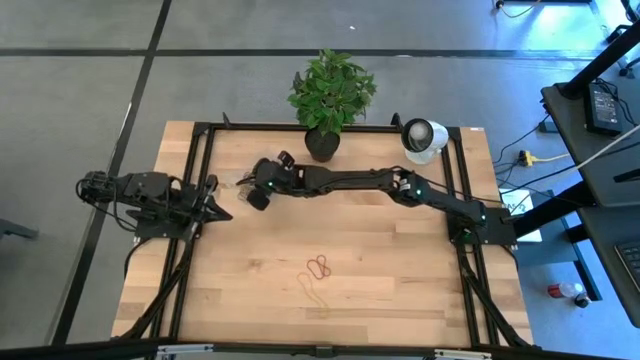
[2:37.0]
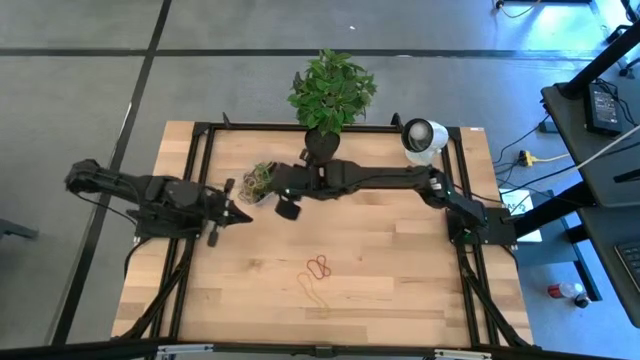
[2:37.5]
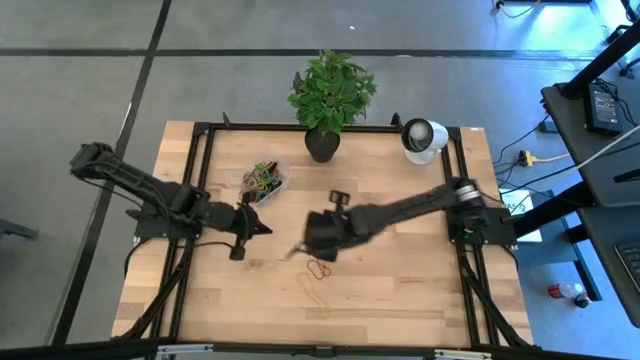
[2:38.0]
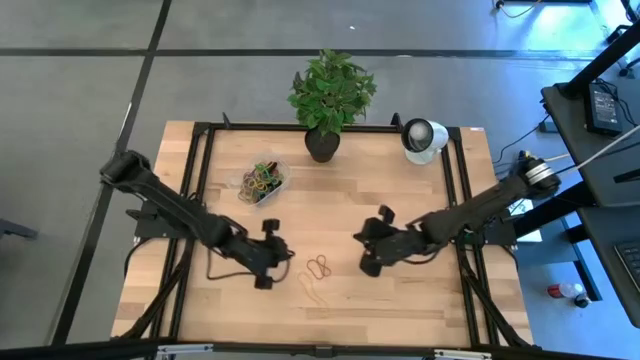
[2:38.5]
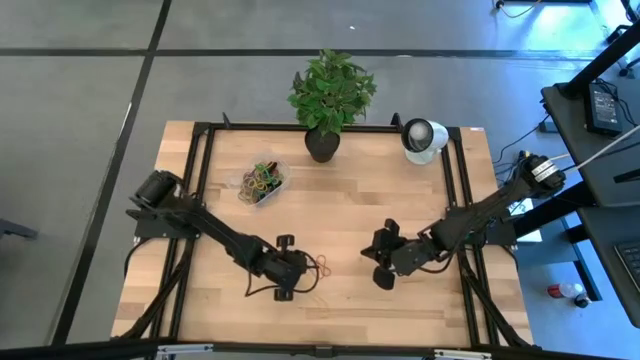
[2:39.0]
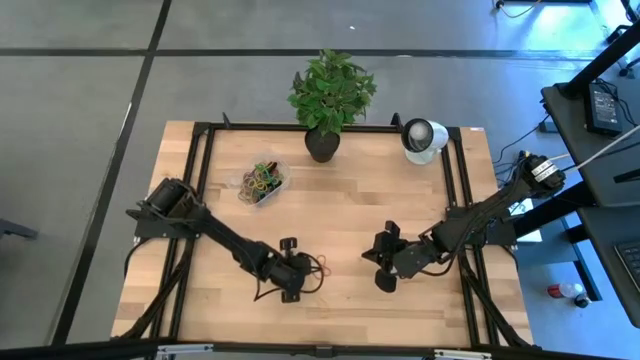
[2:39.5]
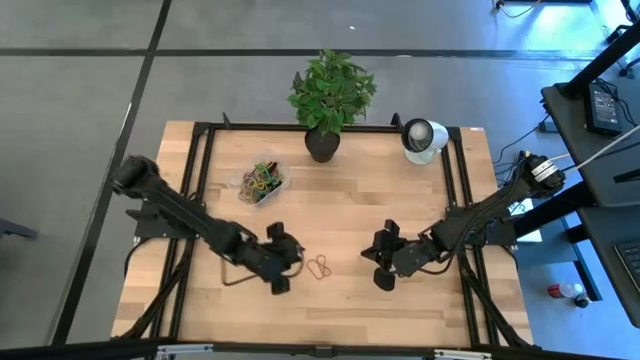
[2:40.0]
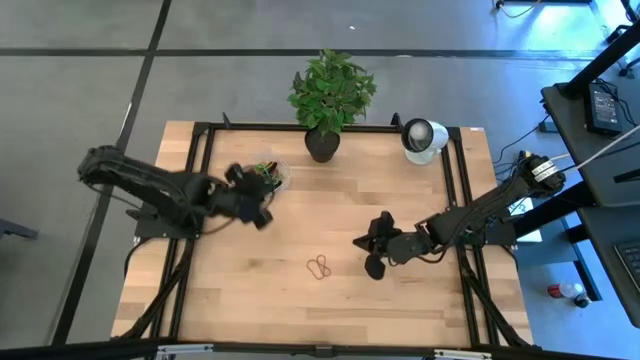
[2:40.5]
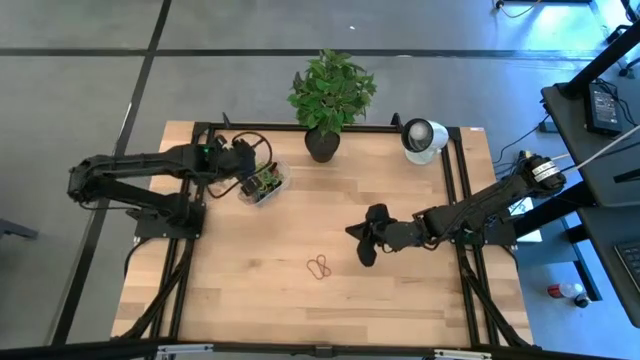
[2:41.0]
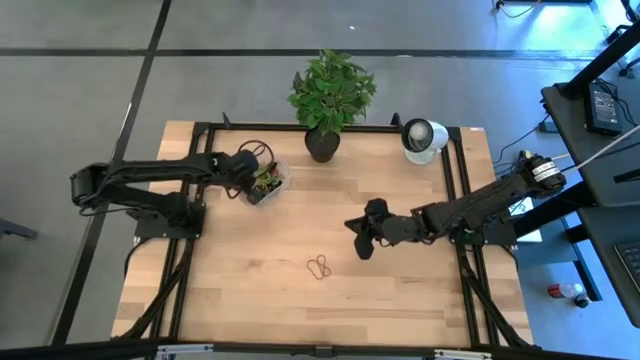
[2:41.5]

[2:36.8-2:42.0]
Task: Pick and place rubber bands into bin
Put the yellow rubber band into the transparent bin

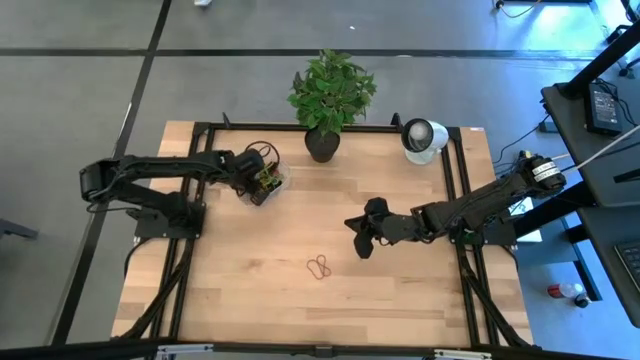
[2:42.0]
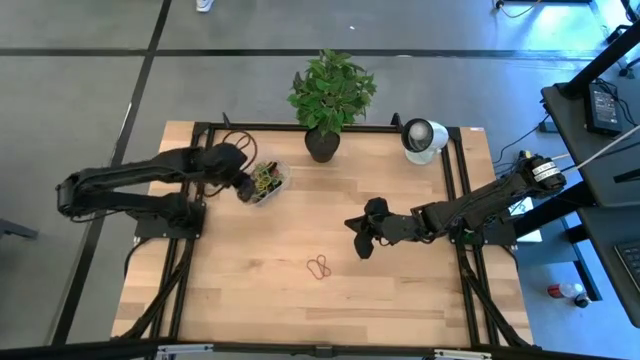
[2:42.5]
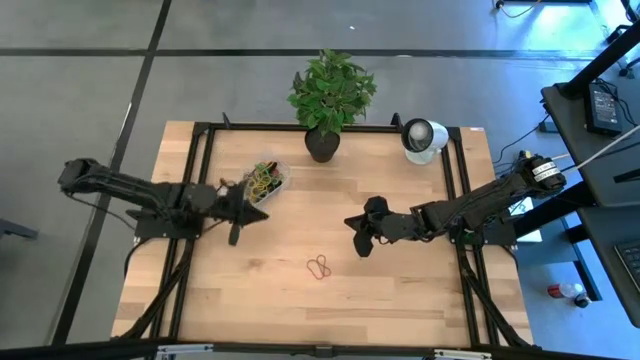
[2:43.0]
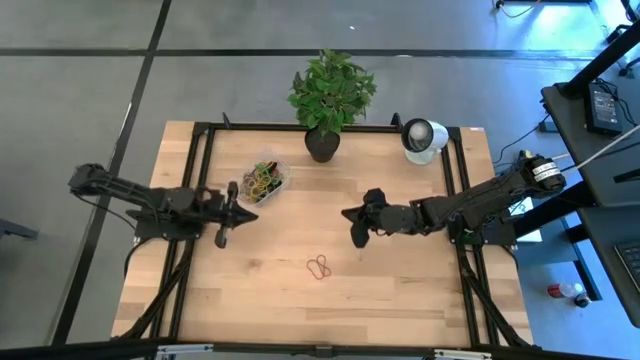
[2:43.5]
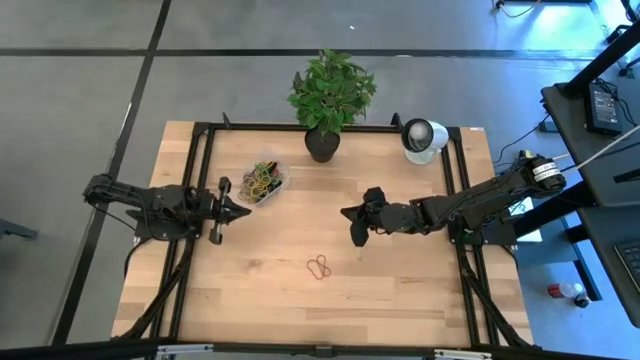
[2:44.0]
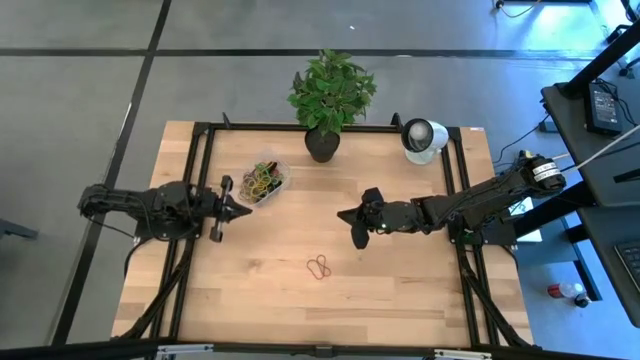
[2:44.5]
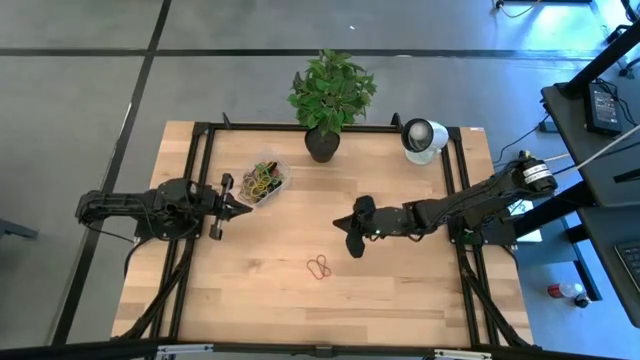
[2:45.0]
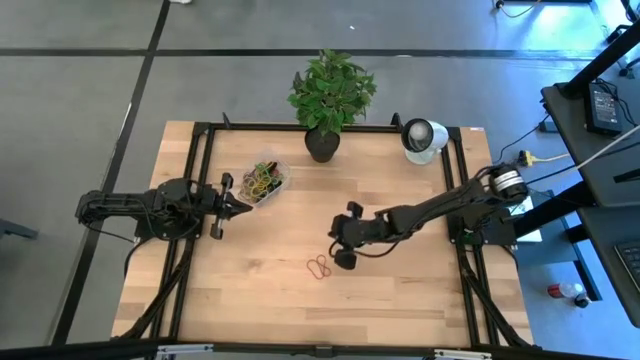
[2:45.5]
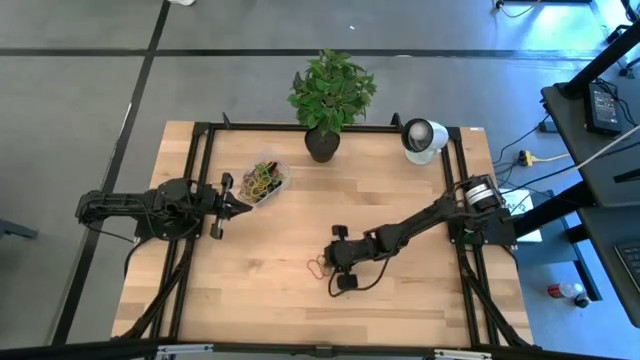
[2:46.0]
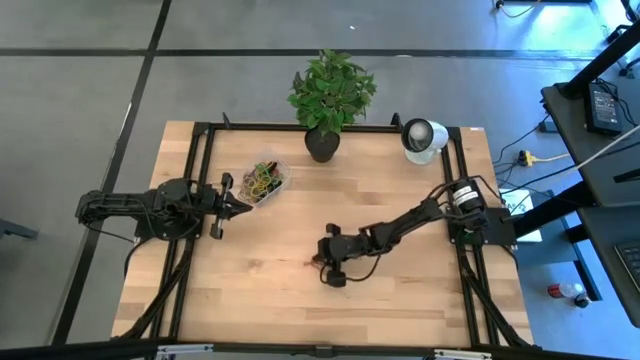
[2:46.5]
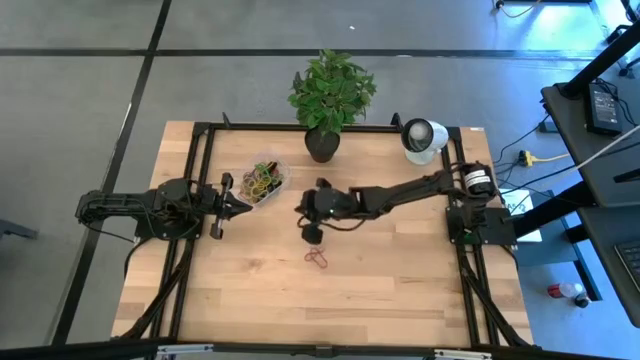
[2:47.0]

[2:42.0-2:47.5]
Put the red rubber band into the transparent bin

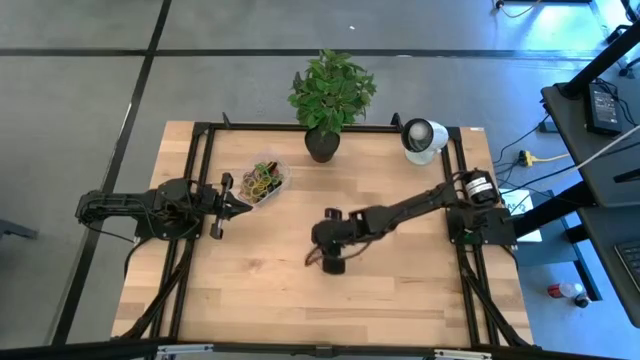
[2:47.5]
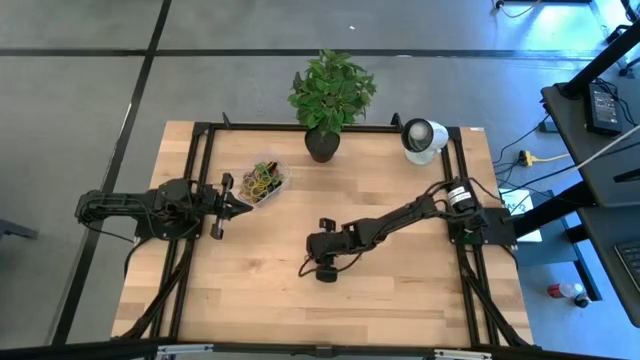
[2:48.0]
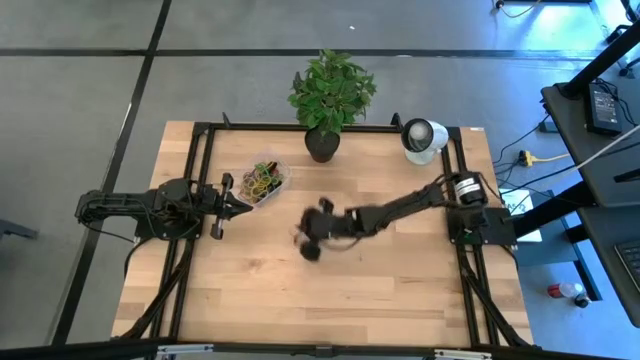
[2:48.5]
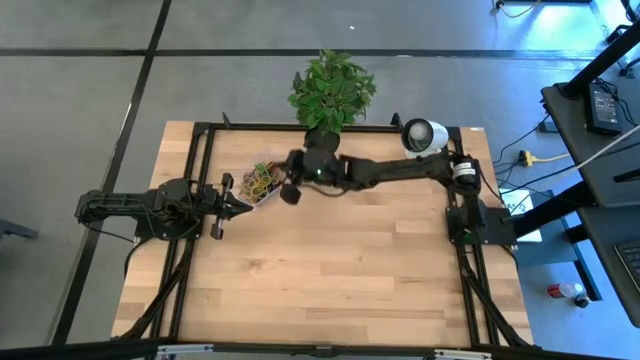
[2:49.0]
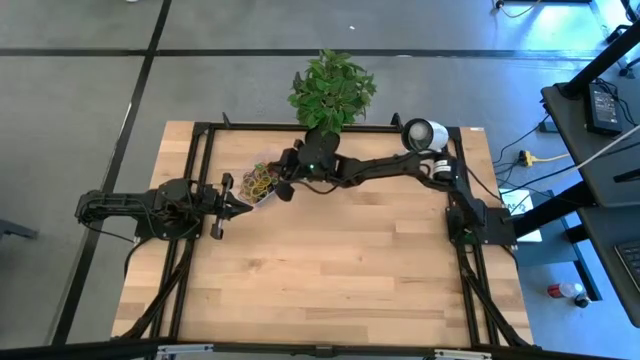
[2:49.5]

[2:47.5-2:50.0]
Put the red rubber band into the transparent bin

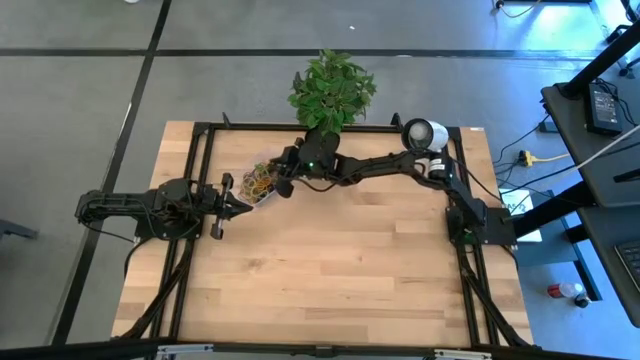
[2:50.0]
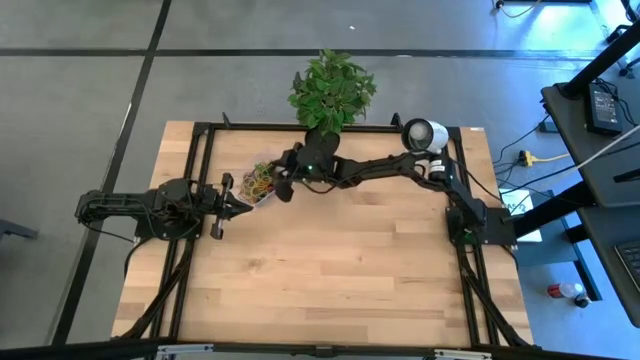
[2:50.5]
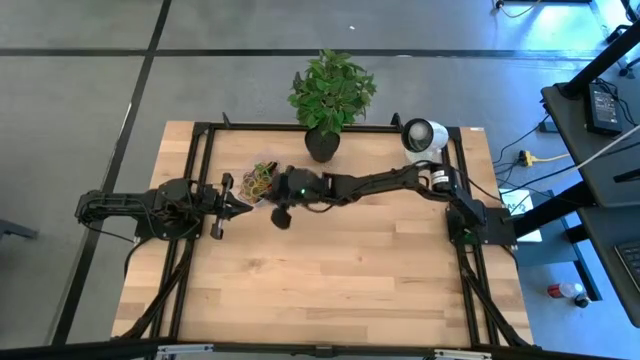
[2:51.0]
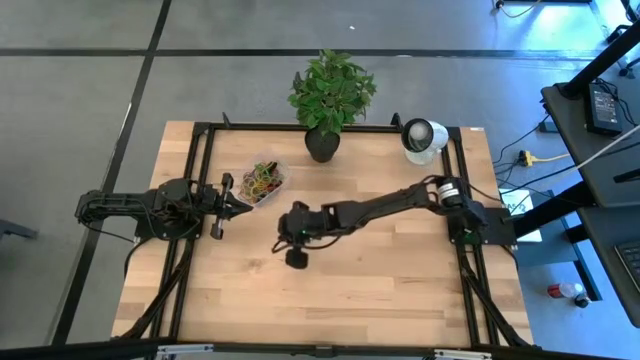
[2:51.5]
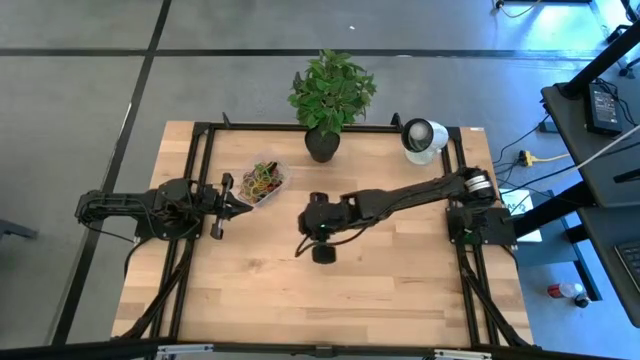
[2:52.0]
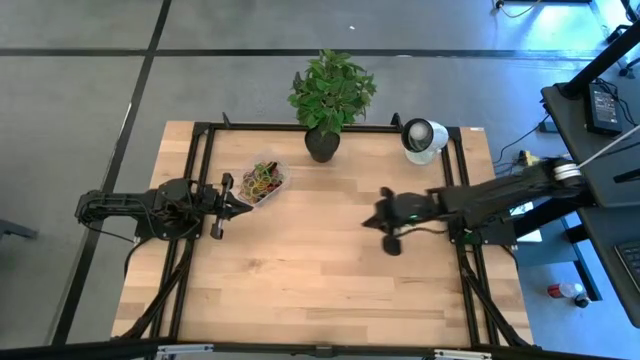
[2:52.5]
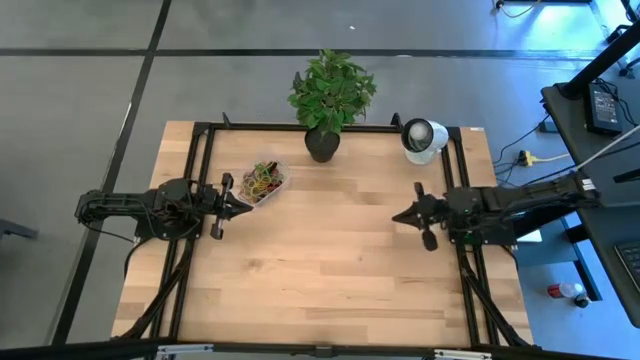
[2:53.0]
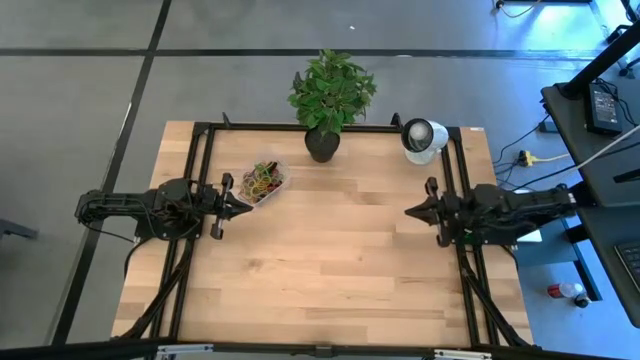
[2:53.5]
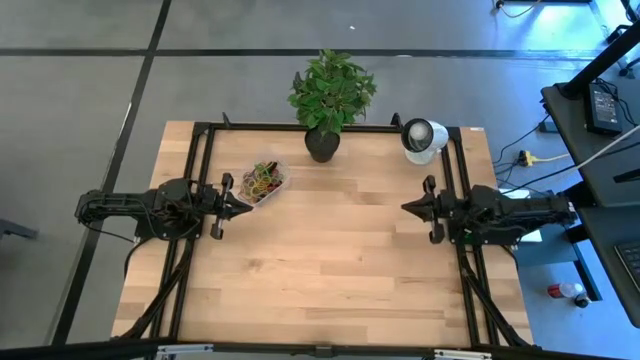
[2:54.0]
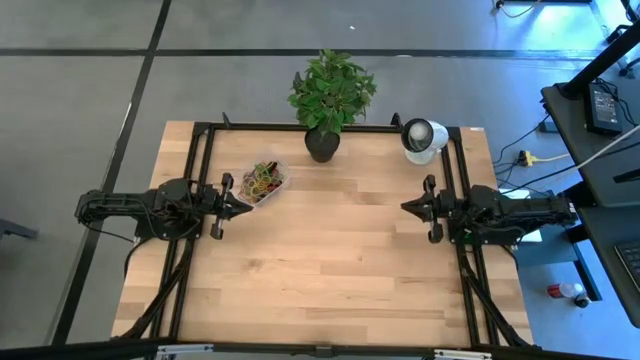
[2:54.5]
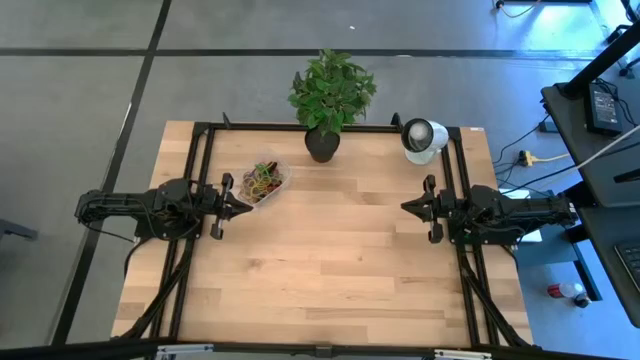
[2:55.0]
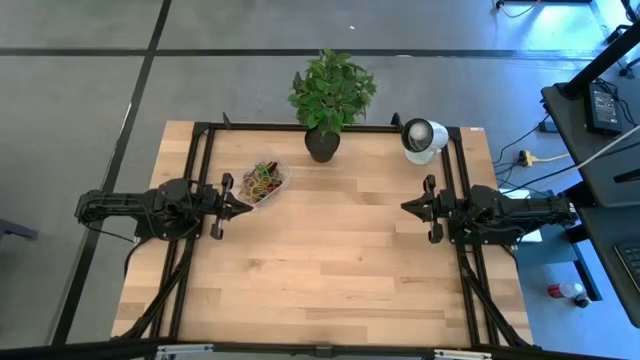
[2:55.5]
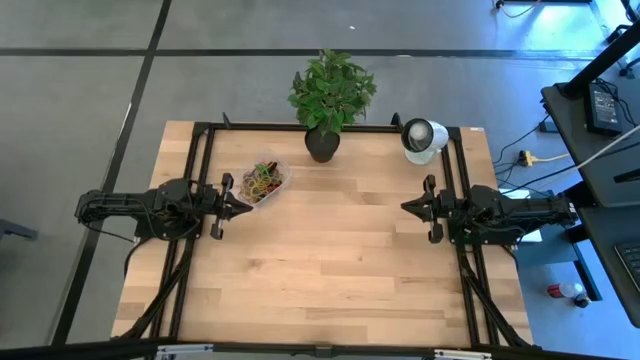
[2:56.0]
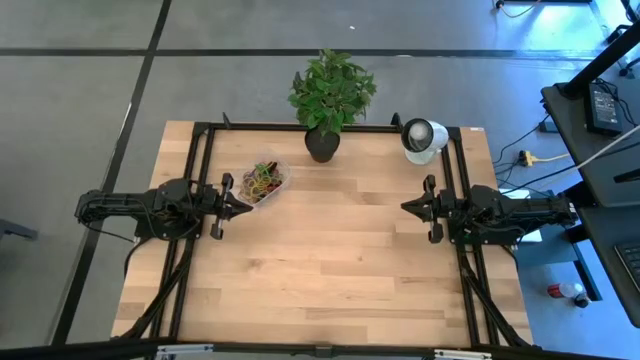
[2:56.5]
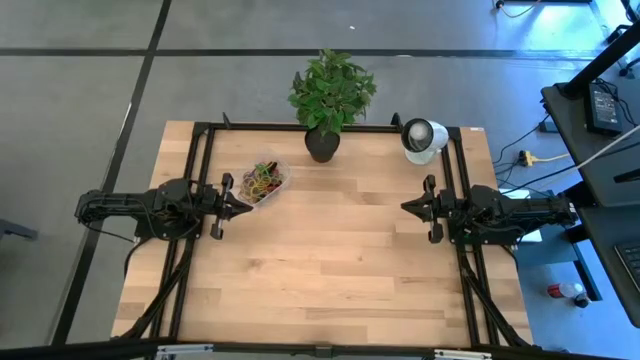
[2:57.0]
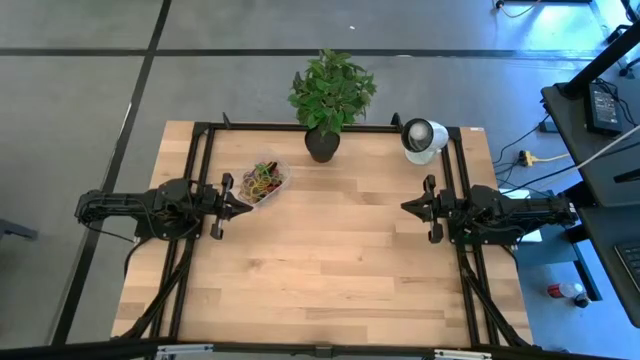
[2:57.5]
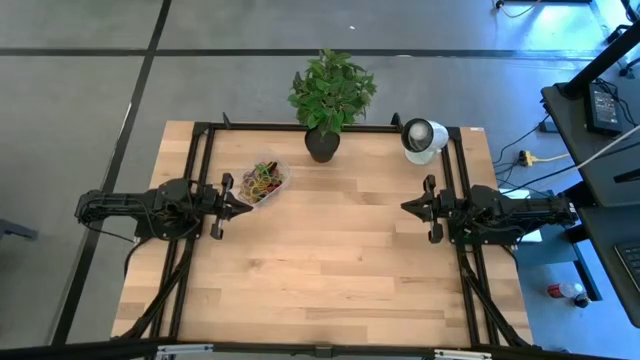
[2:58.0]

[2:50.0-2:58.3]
Return to Home Position
